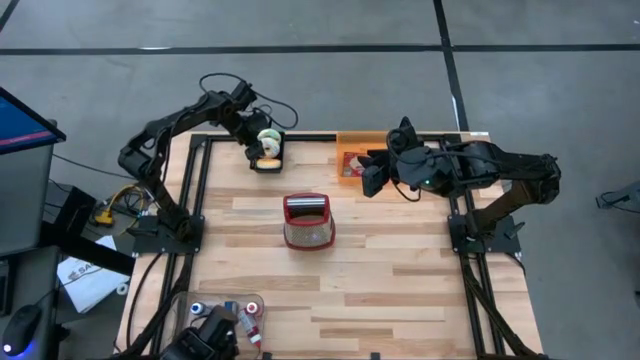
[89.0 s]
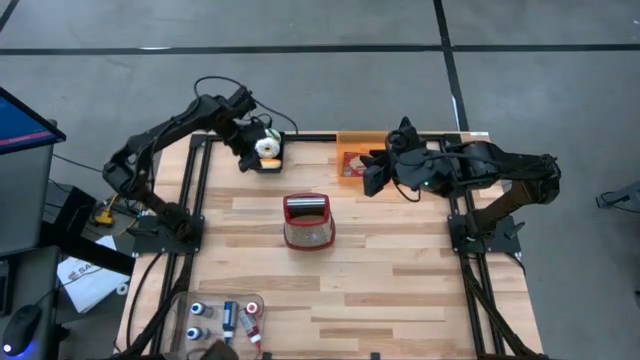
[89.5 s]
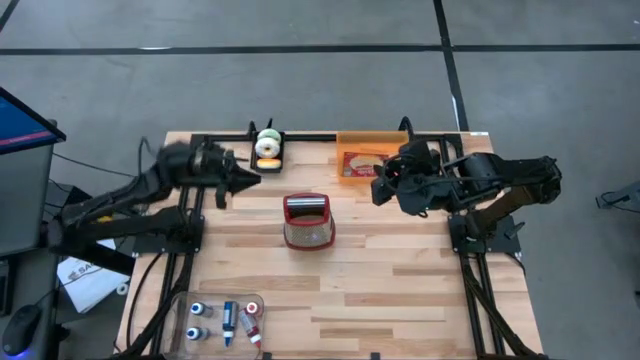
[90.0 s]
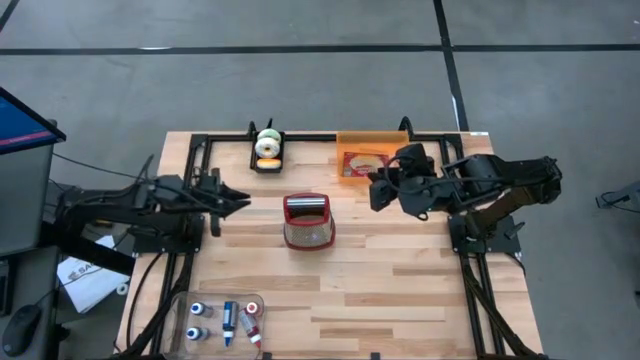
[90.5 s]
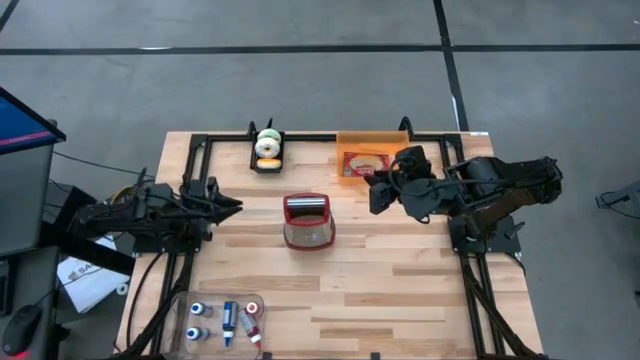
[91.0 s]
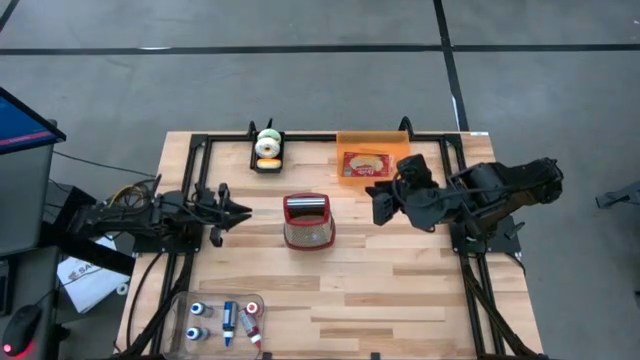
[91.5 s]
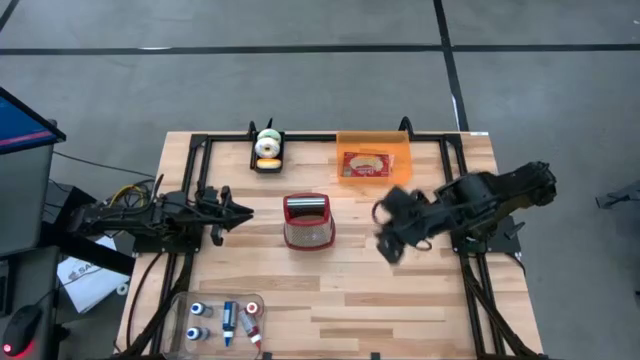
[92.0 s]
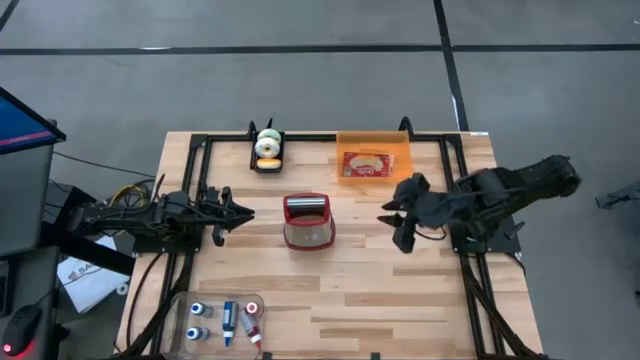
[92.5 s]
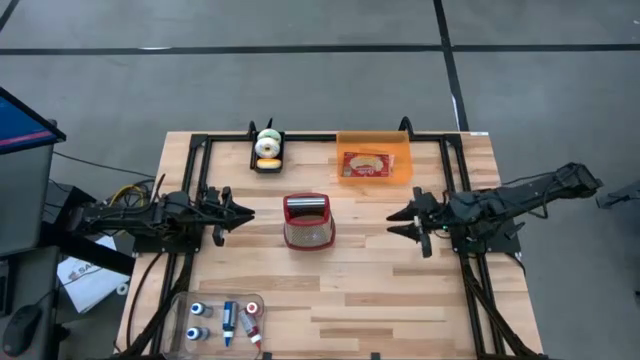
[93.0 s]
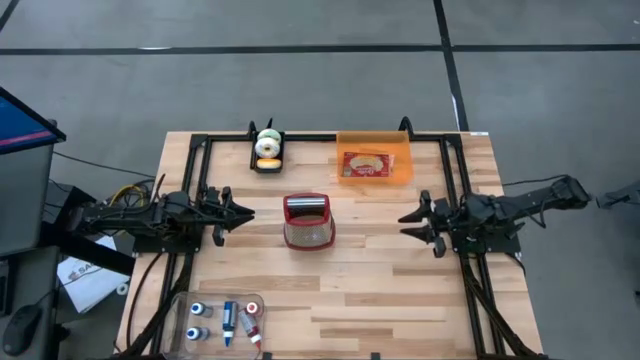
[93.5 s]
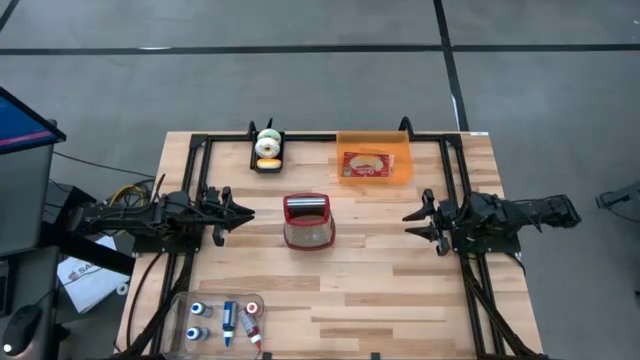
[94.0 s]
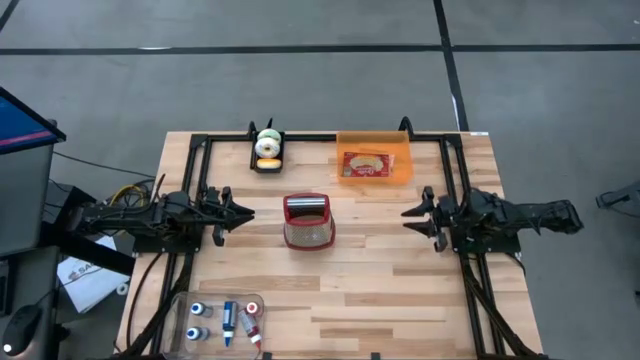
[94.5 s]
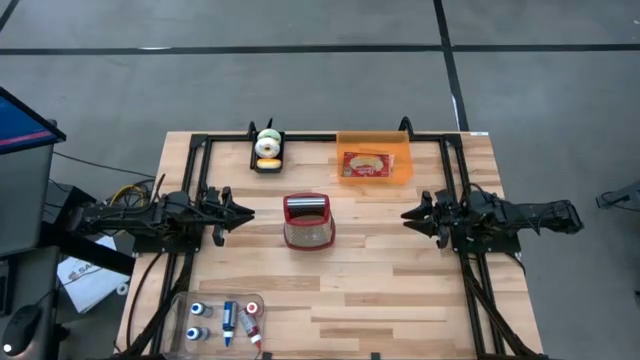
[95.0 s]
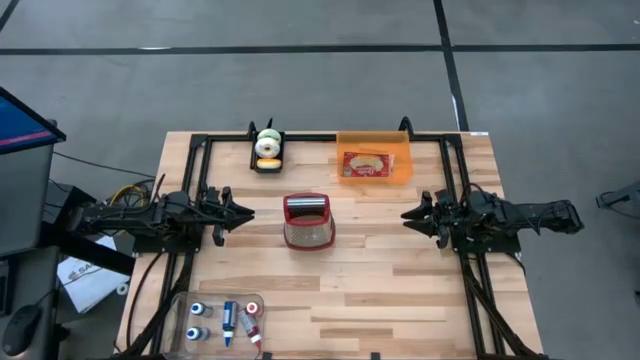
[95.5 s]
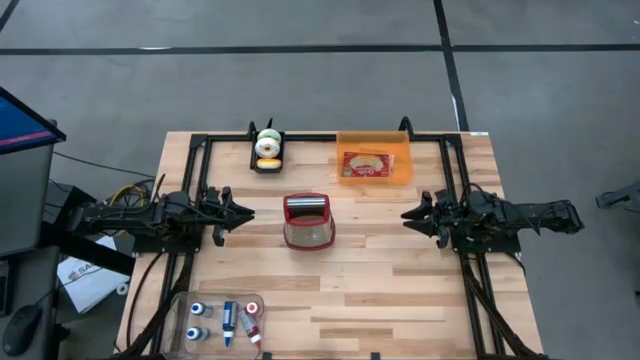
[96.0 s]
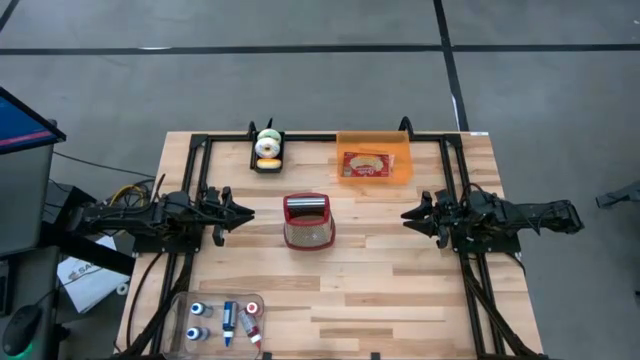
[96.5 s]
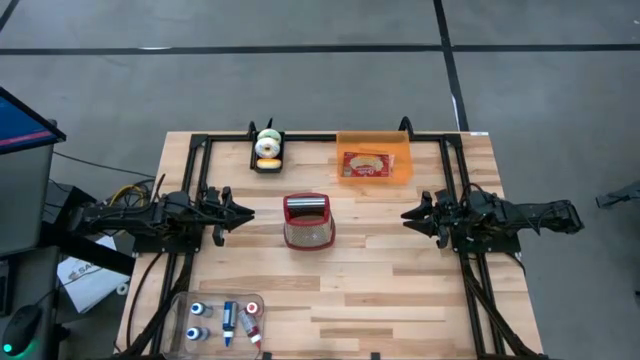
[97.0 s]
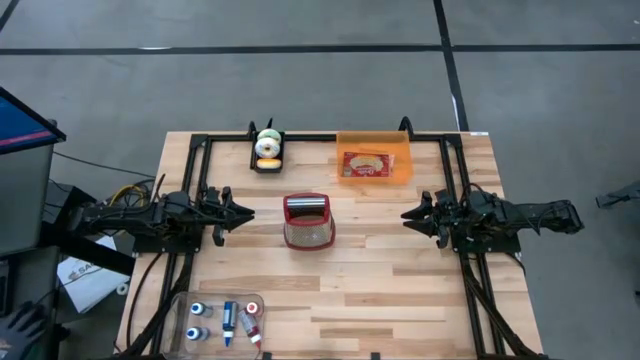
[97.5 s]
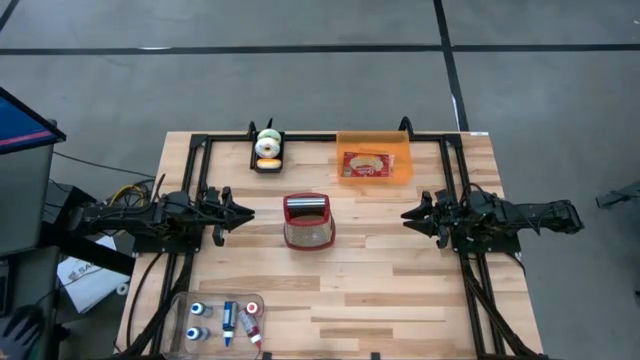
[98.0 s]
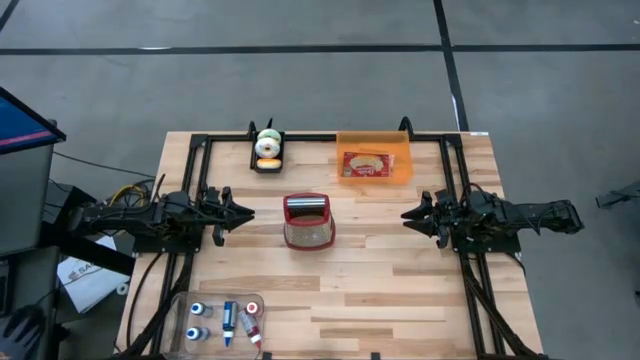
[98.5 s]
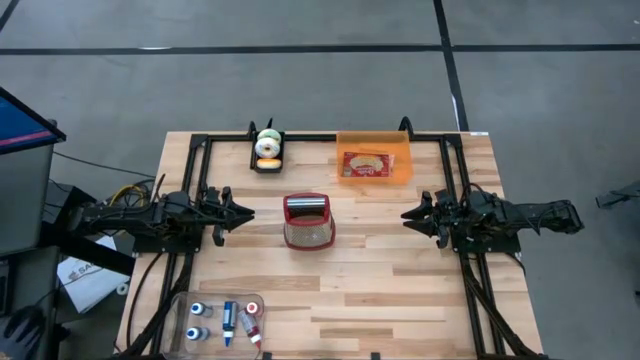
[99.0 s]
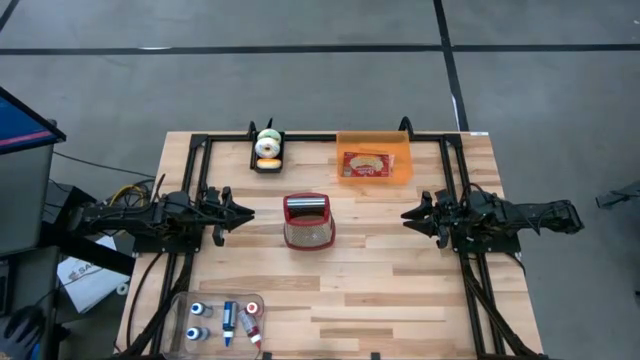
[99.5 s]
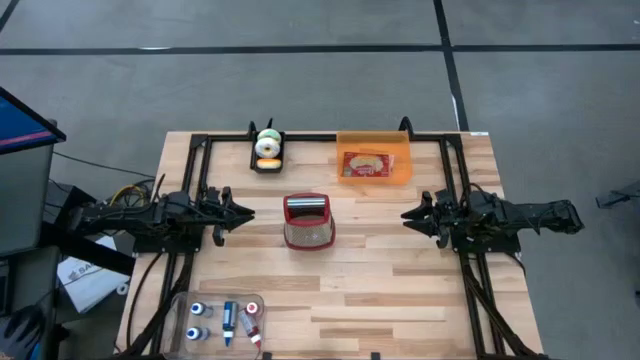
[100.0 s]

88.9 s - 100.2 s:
Return to Home Position

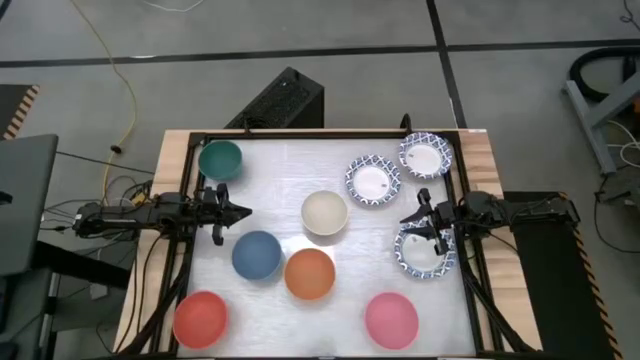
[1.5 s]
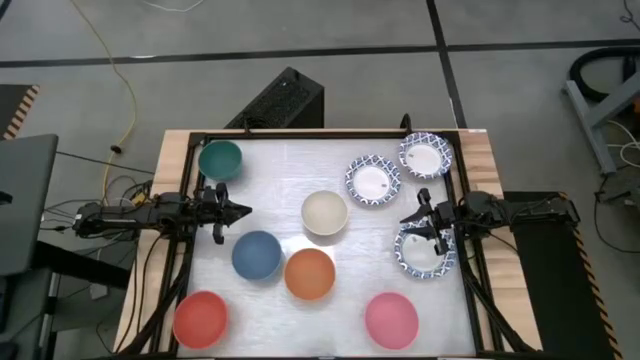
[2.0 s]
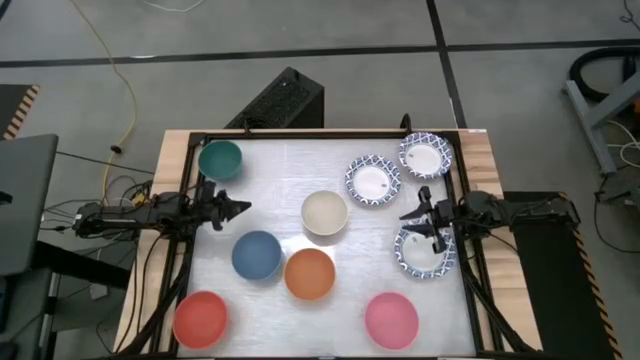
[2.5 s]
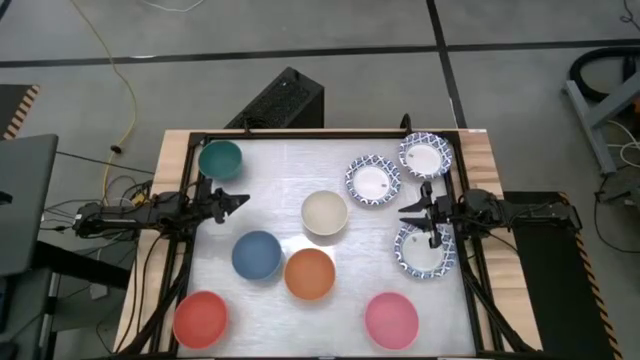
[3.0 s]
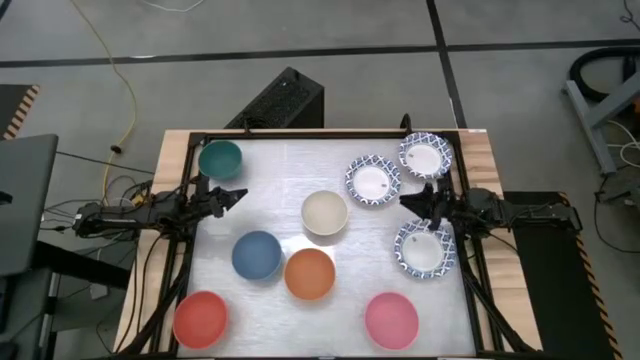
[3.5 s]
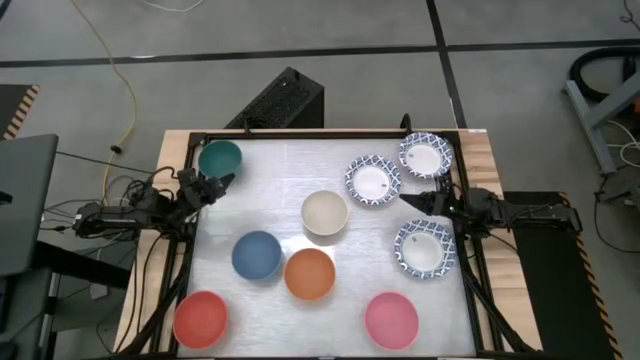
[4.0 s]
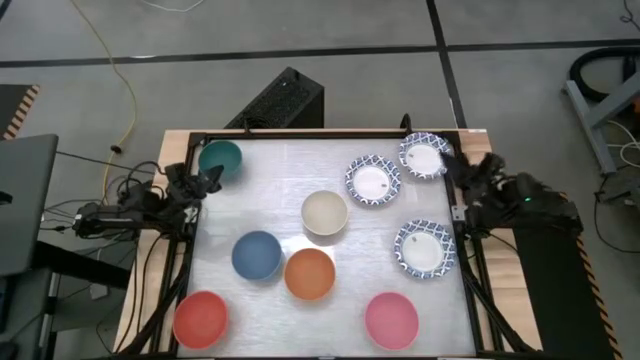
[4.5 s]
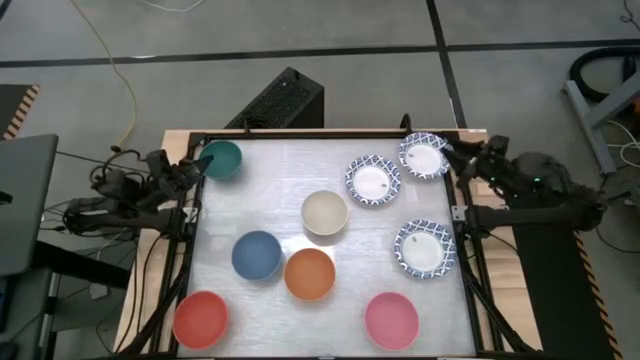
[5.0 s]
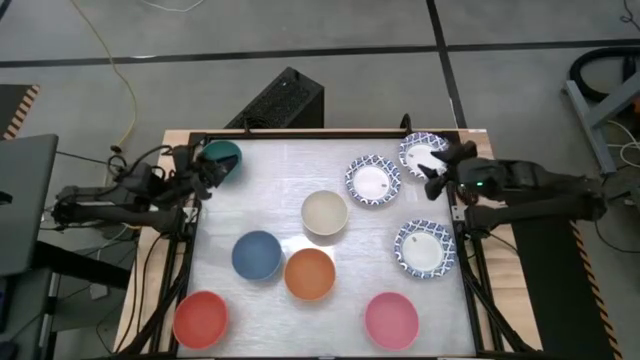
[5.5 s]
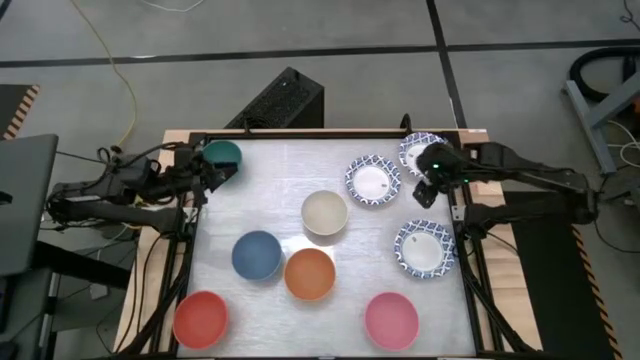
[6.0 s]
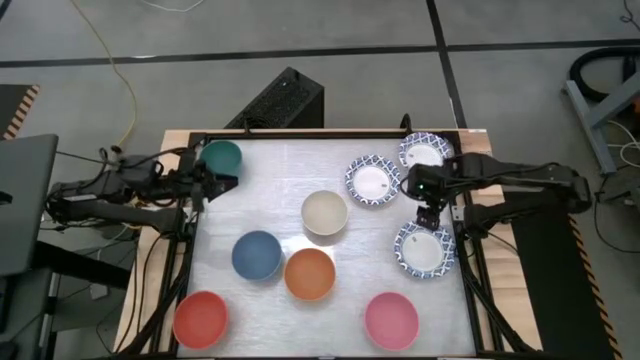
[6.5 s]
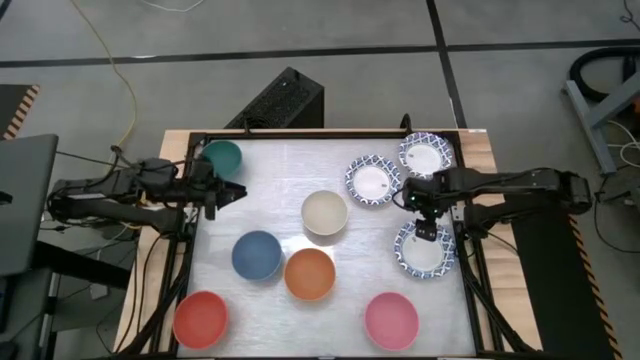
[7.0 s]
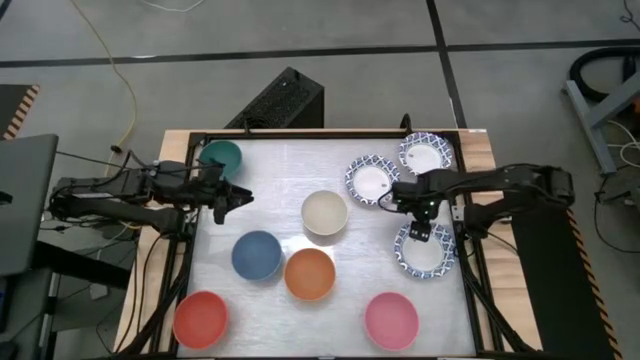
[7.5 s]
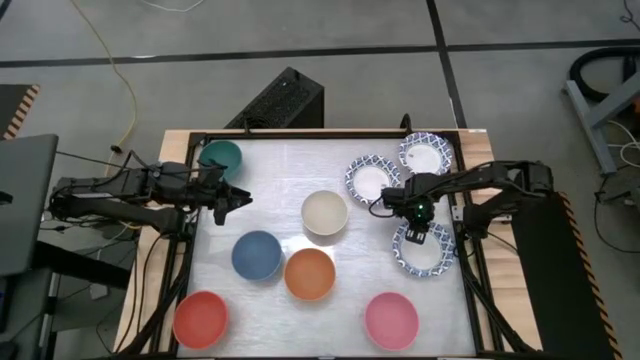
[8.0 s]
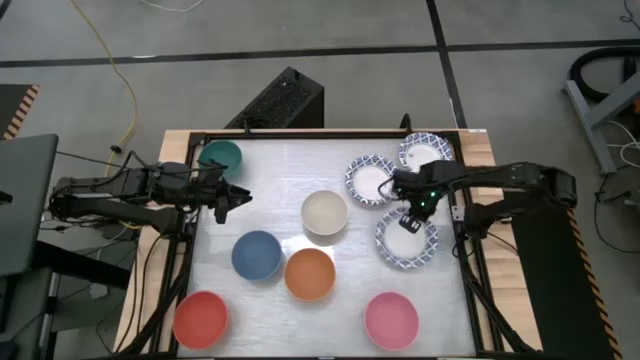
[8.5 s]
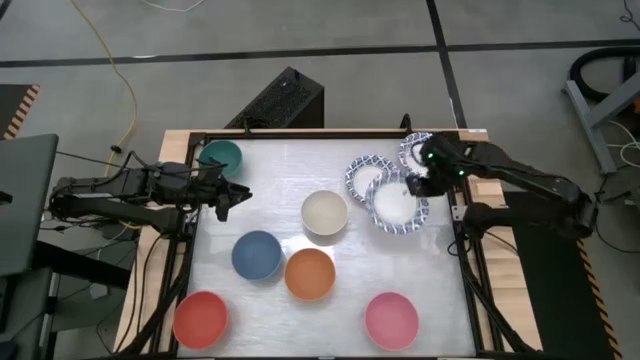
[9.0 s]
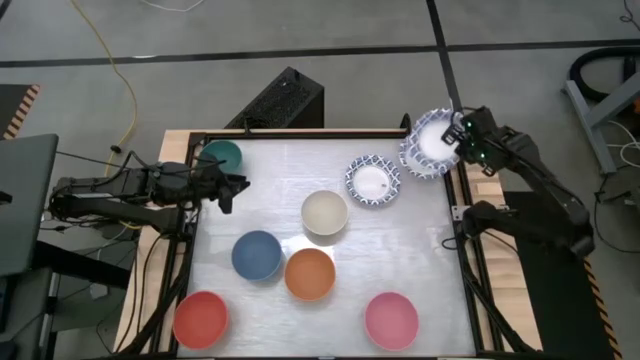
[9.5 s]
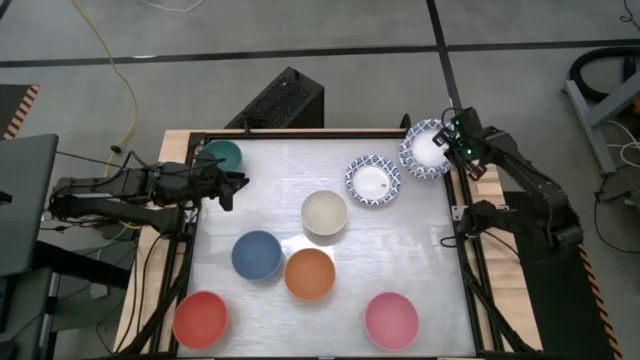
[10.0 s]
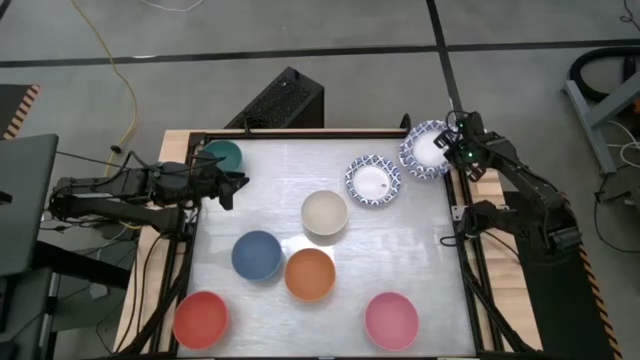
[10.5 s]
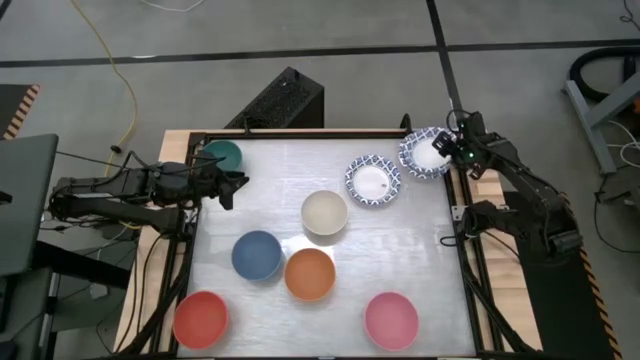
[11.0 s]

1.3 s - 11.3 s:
Stack the bottom blue patterned bowl into the blue patterned bowl
